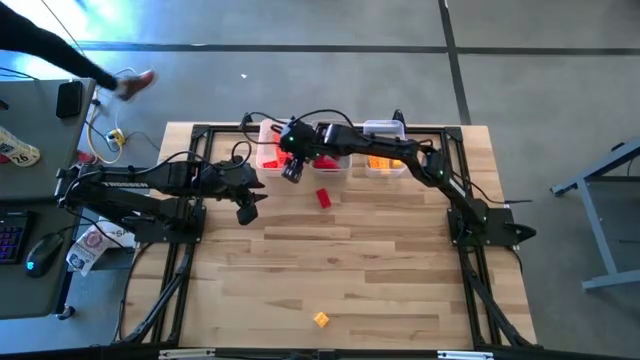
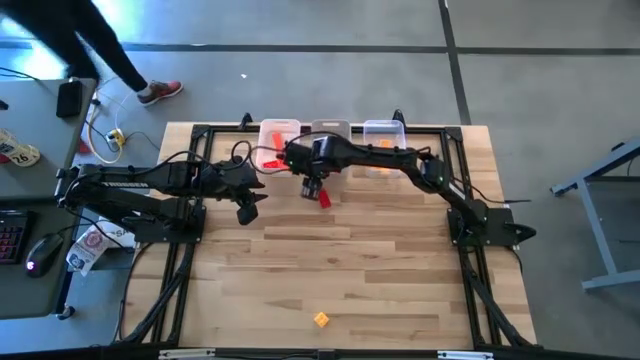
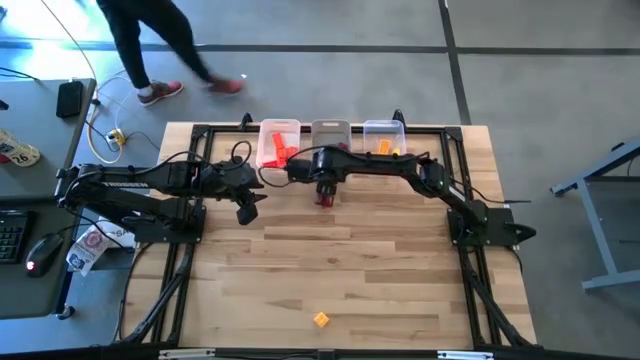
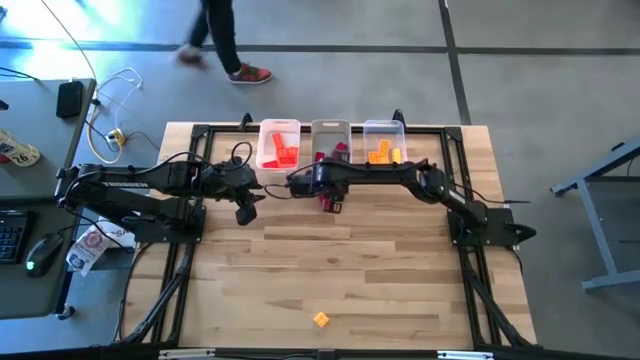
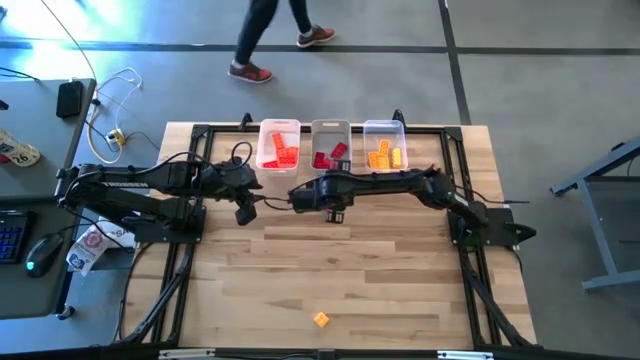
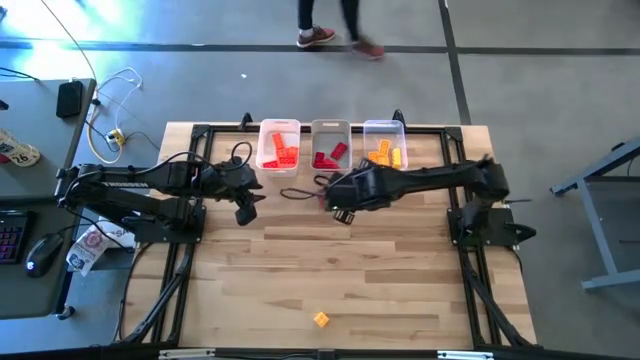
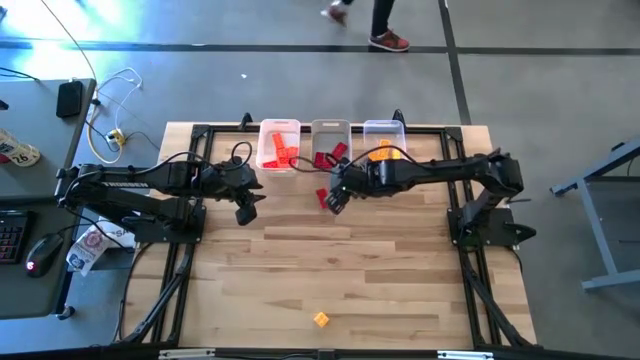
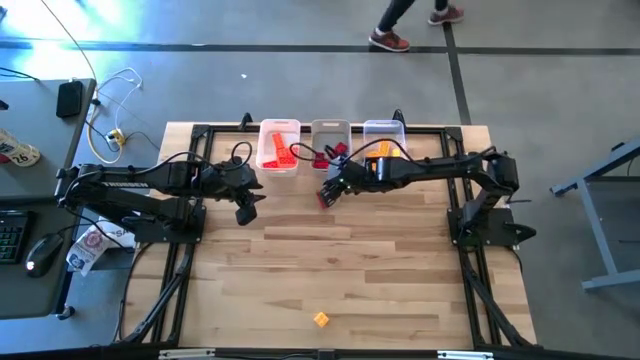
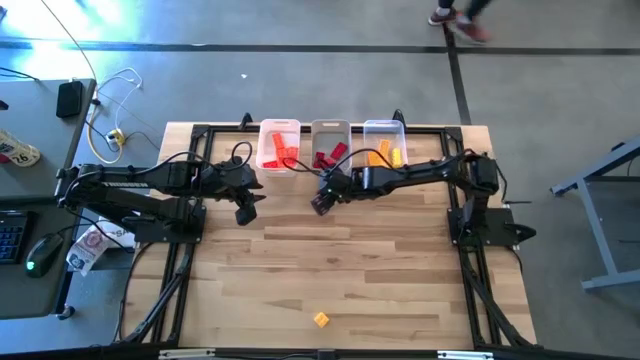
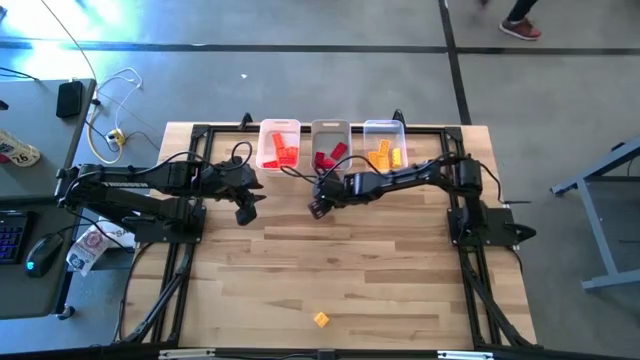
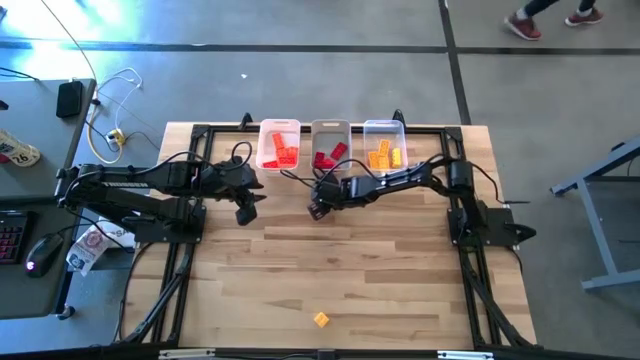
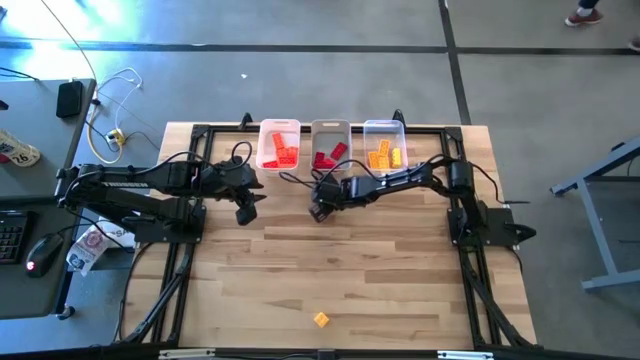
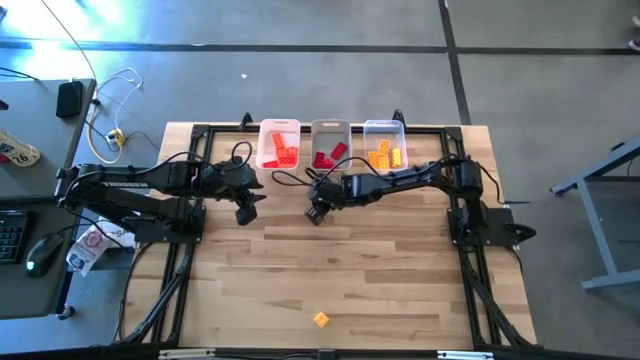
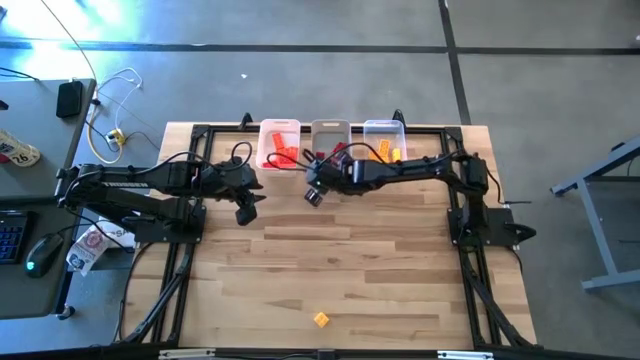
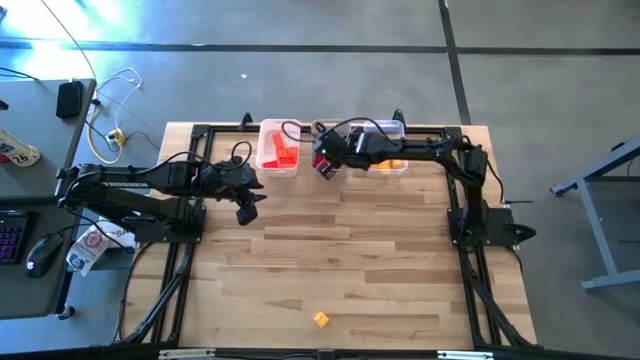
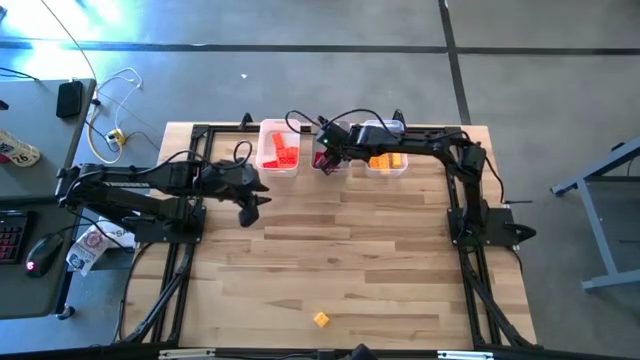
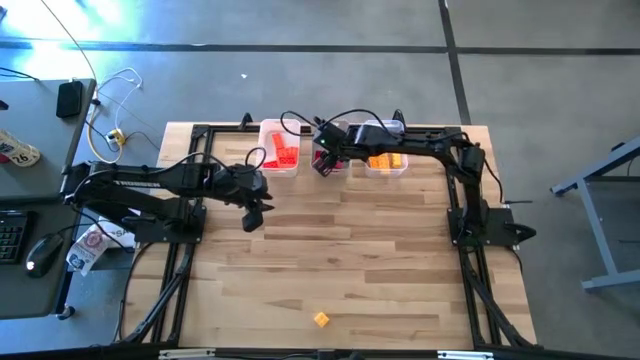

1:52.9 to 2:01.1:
Task: Sort & place blocks by color
Put the red game piece into the gray bin

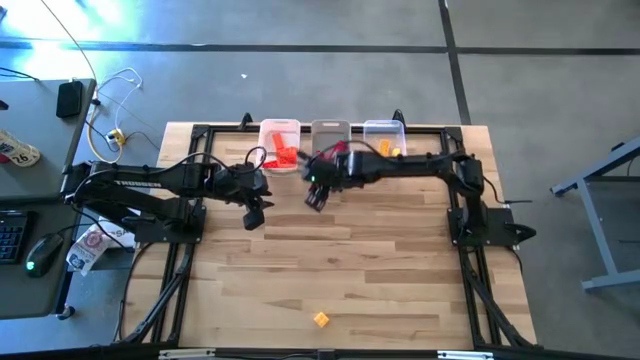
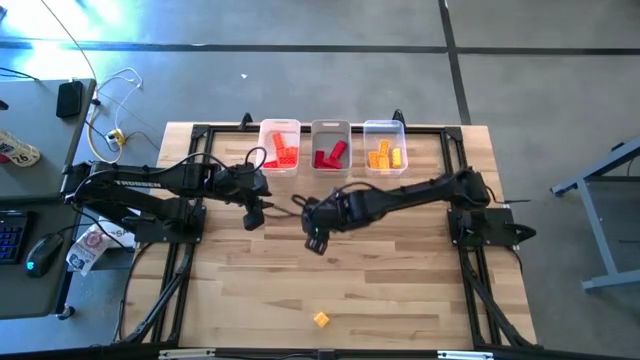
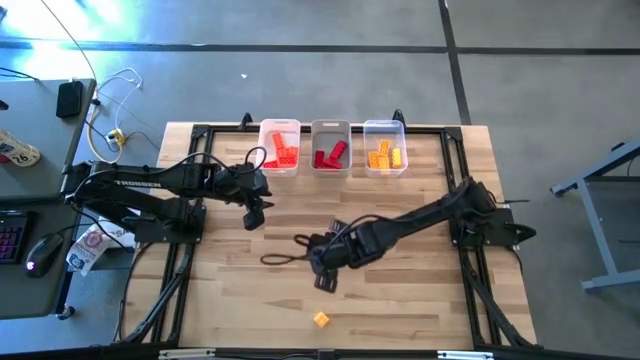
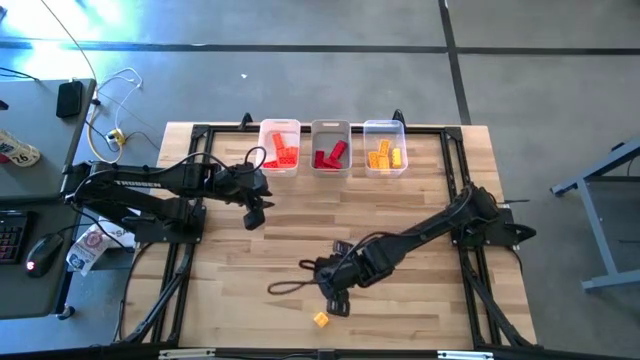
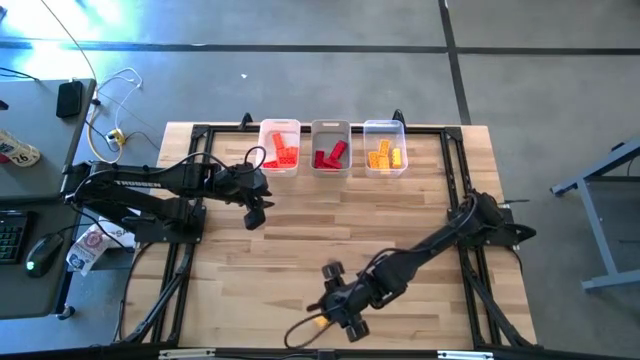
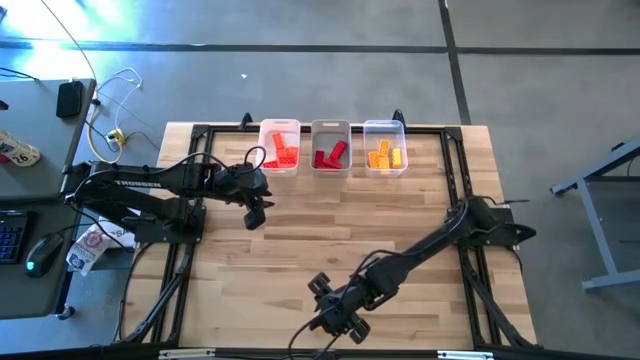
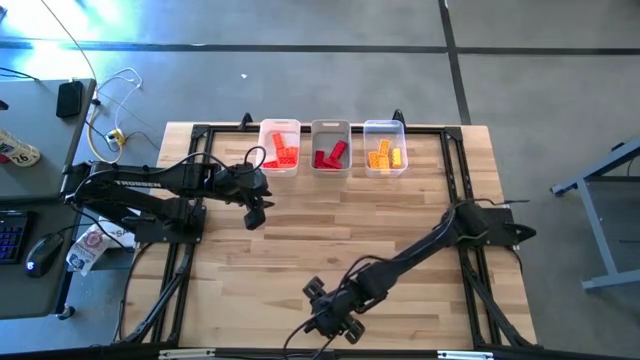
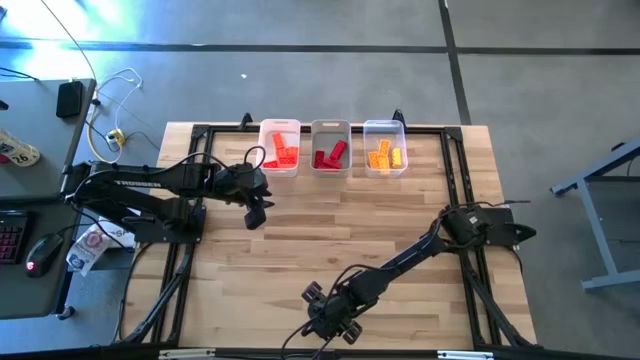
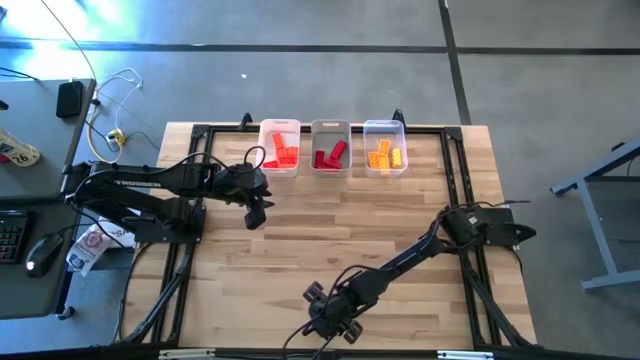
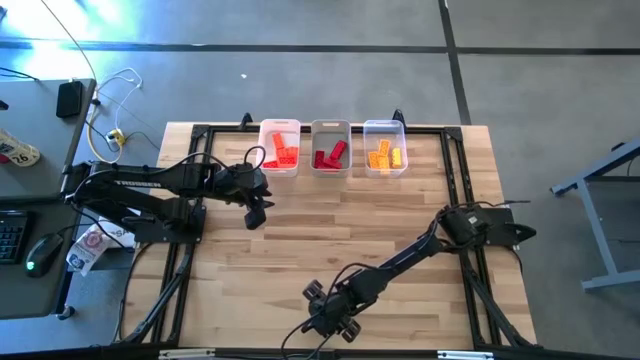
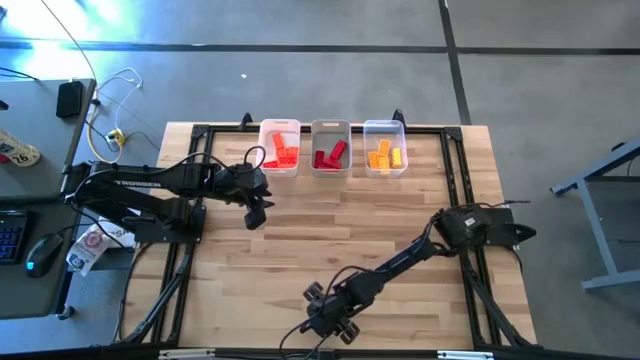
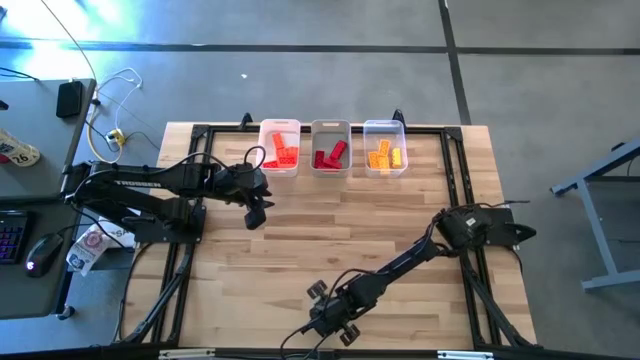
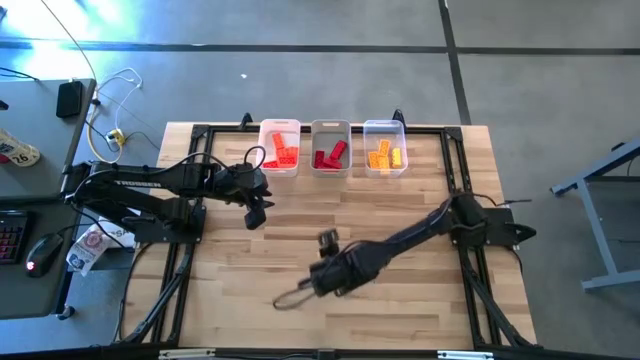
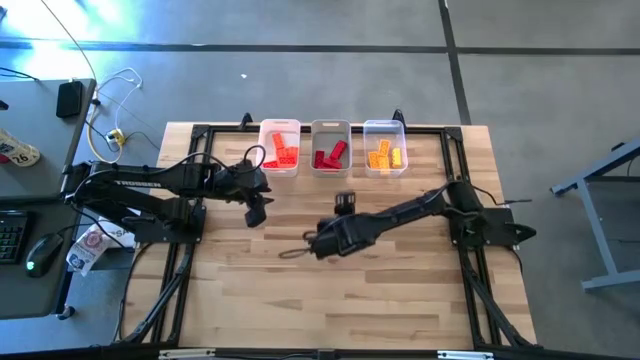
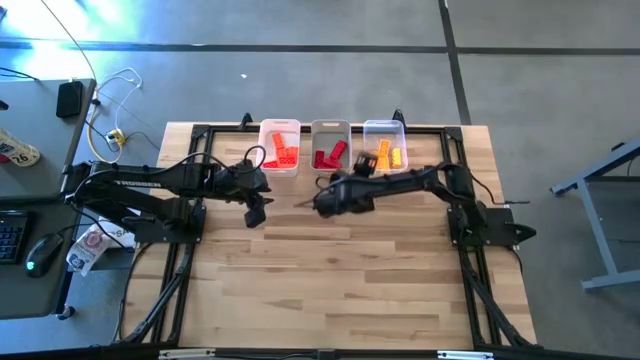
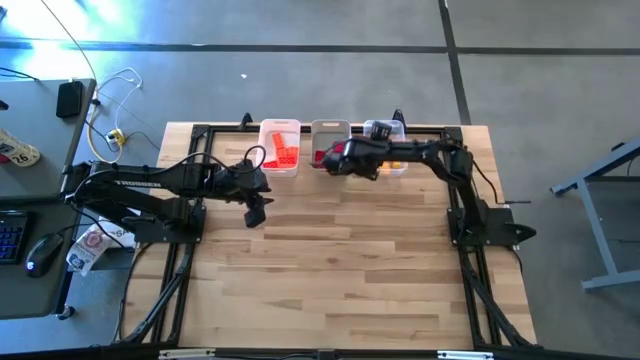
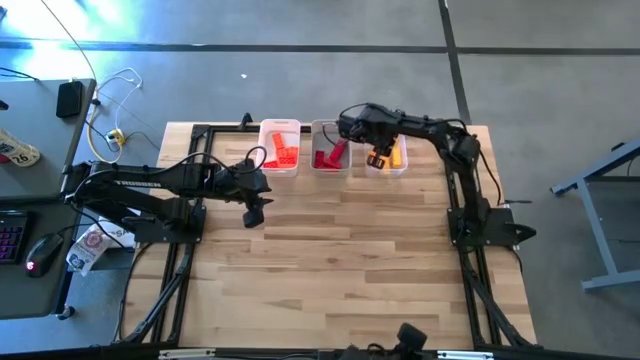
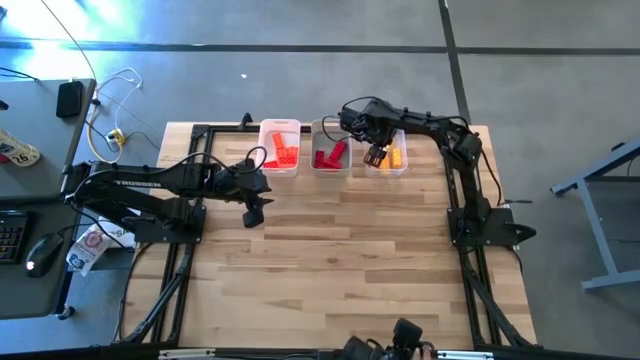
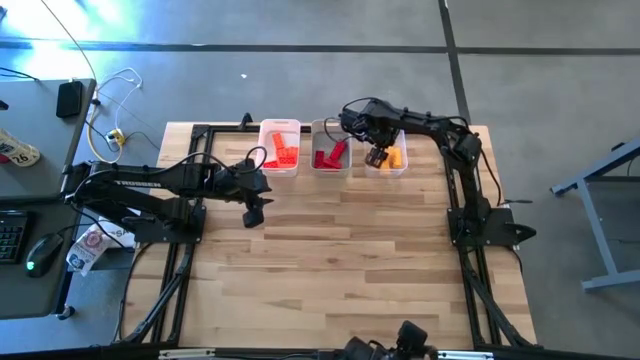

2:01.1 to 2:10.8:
Put the yellow game piece into the transparent bin

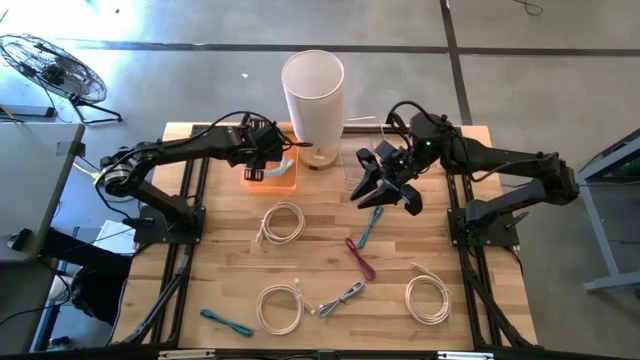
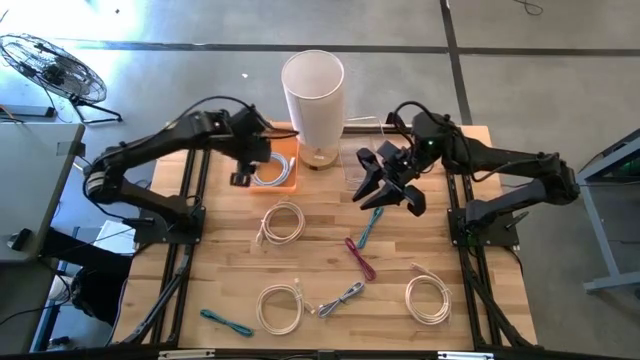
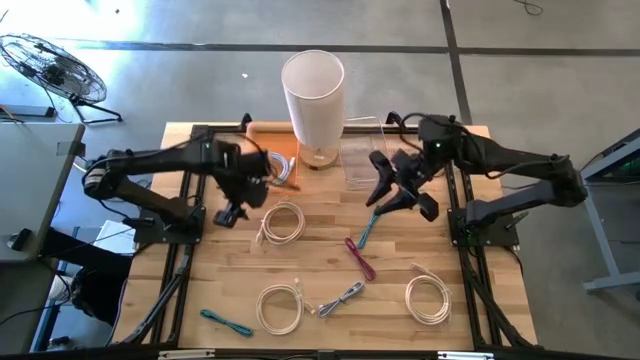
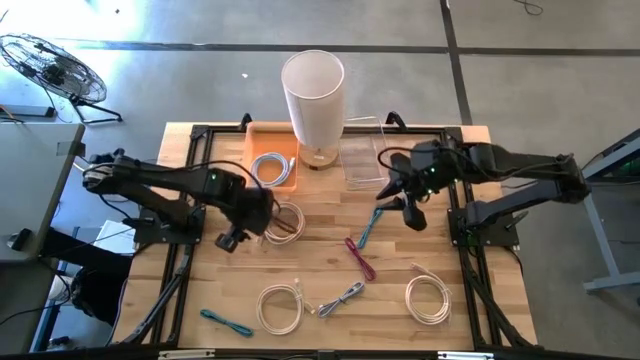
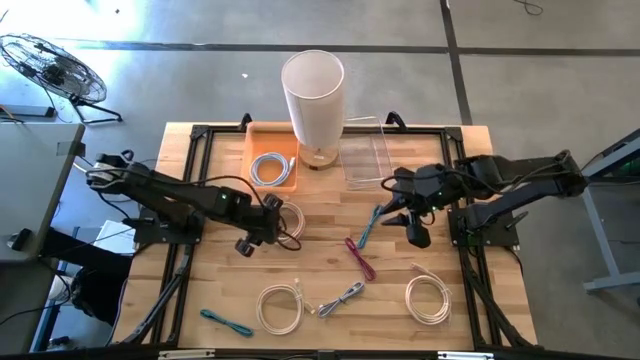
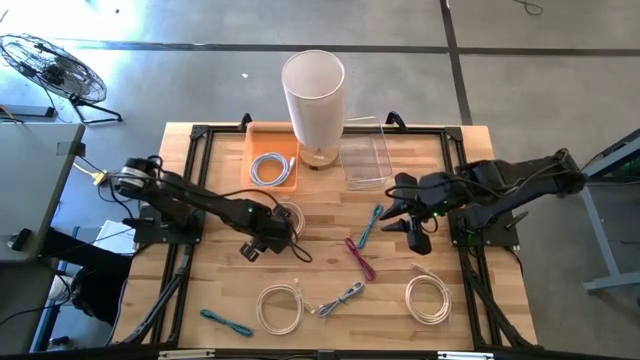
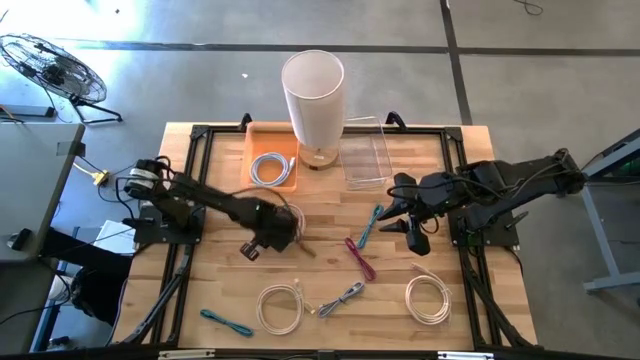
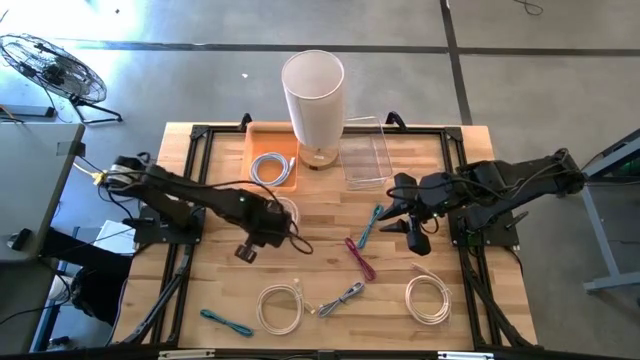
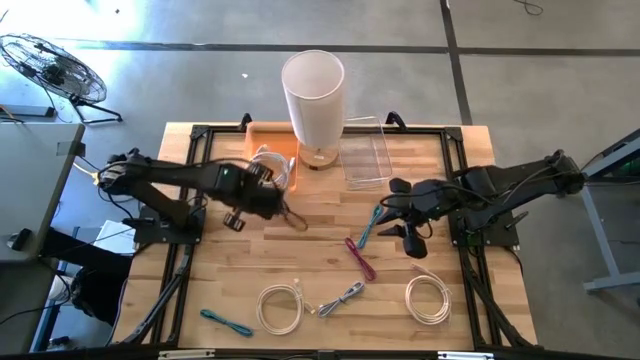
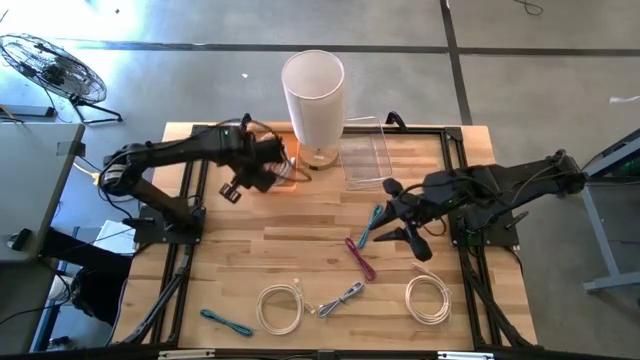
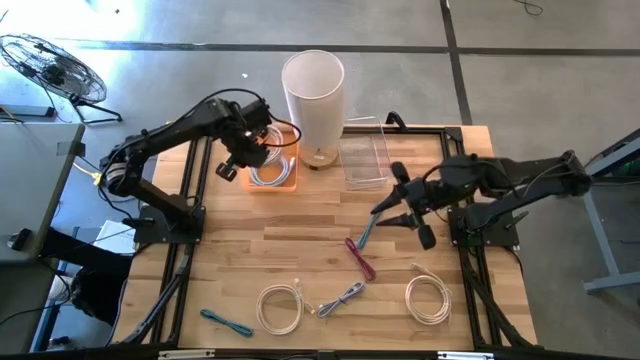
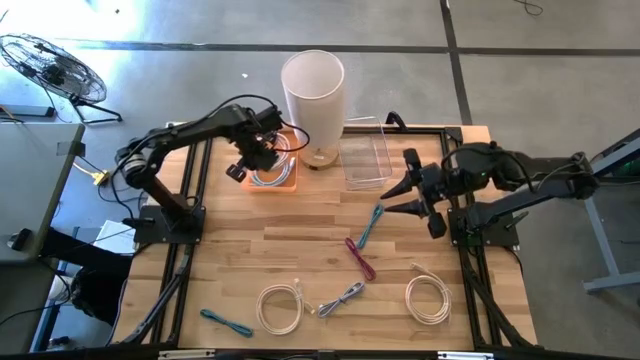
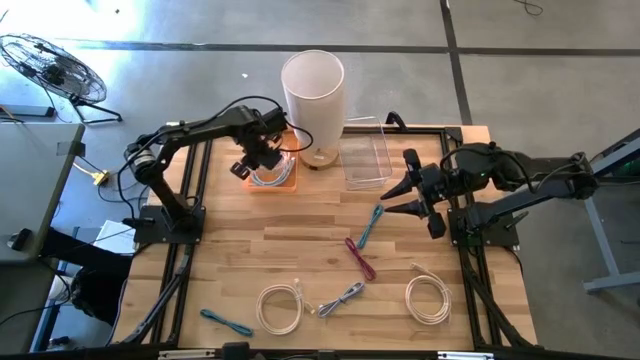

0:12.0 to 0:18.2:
Task: Pick & Place USB Port
Put the top light brown HDMI cable into the orange bin
